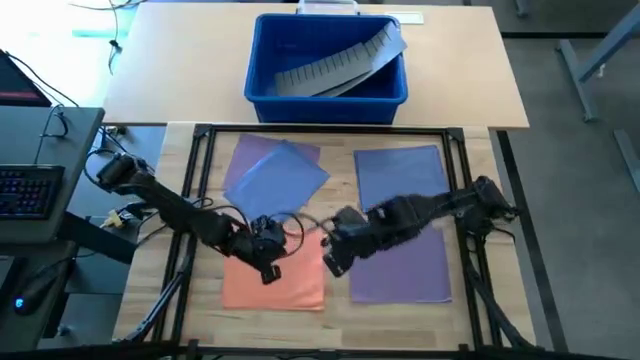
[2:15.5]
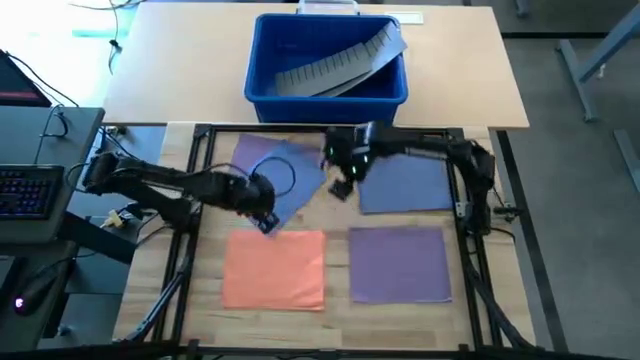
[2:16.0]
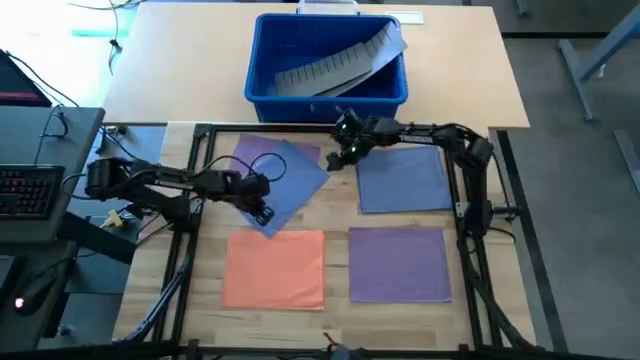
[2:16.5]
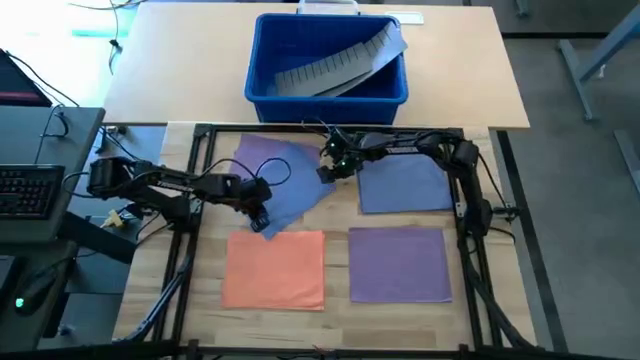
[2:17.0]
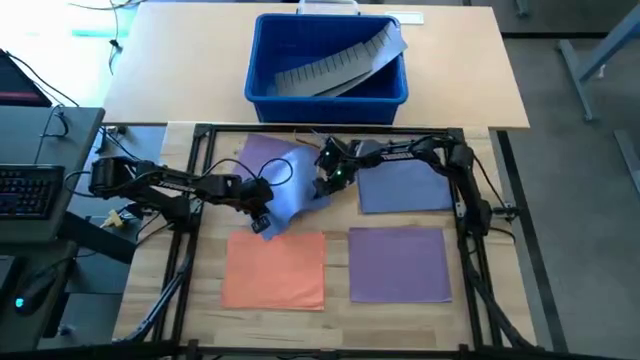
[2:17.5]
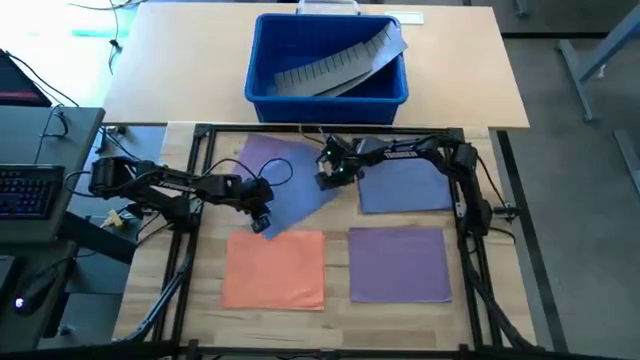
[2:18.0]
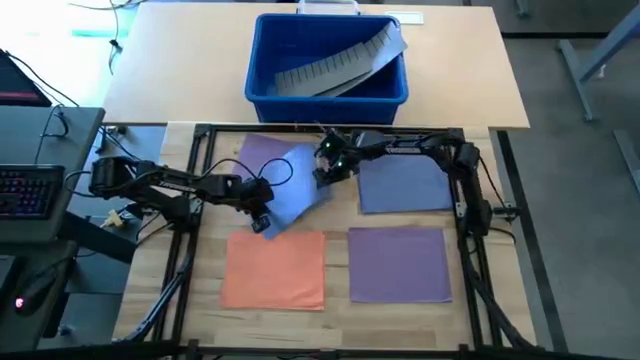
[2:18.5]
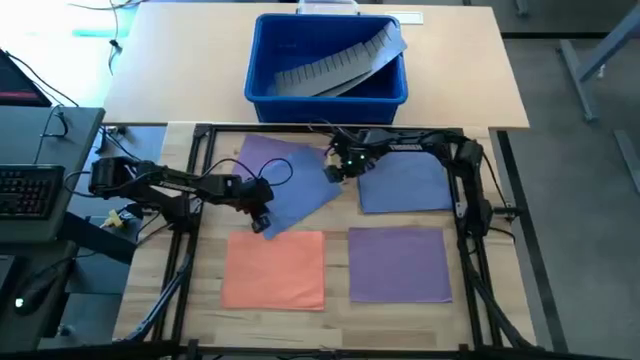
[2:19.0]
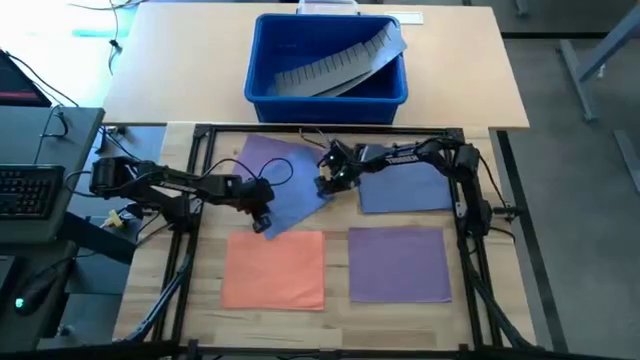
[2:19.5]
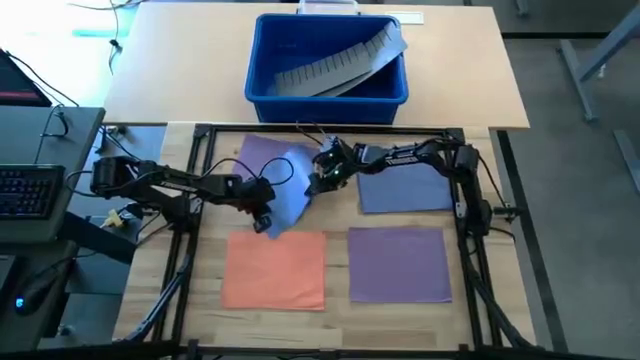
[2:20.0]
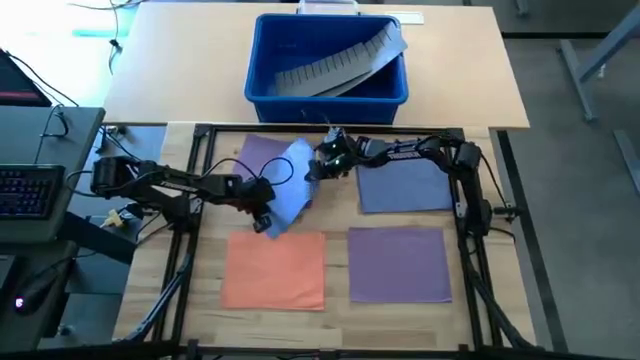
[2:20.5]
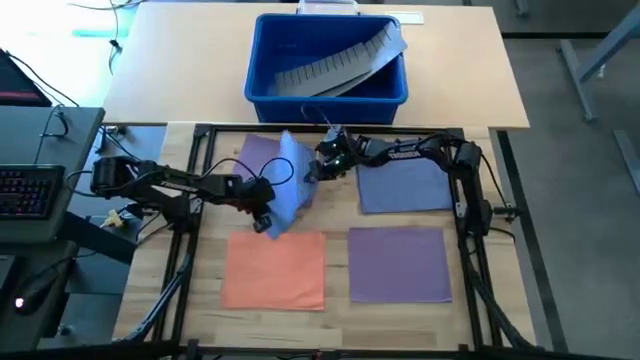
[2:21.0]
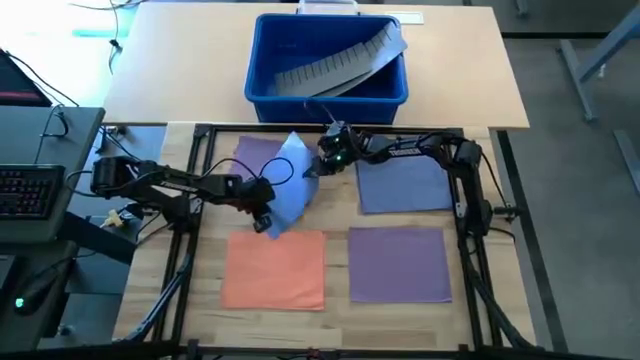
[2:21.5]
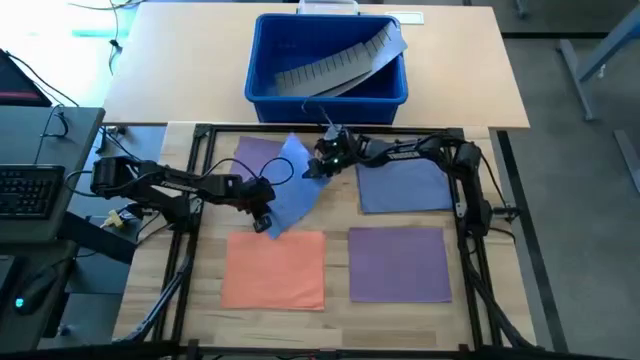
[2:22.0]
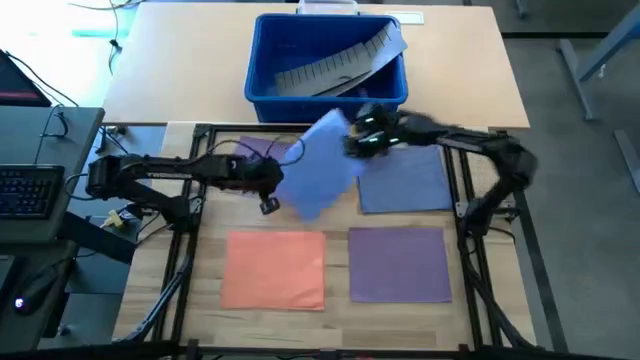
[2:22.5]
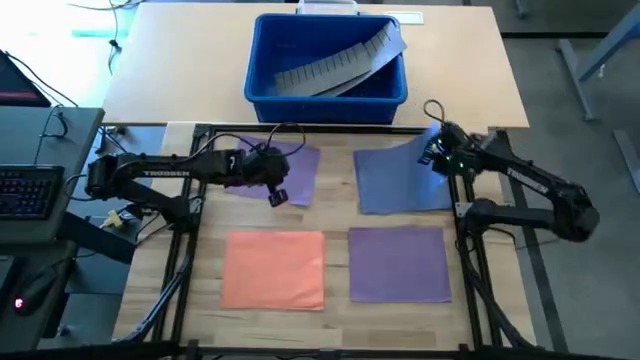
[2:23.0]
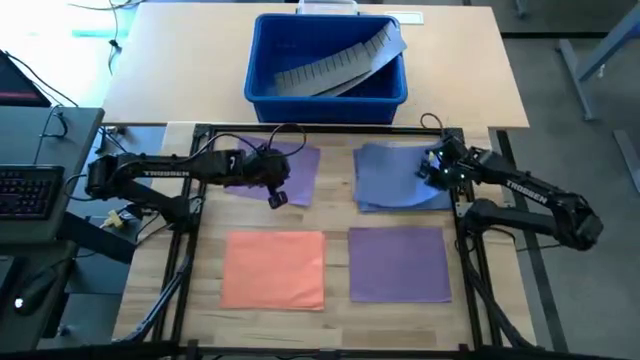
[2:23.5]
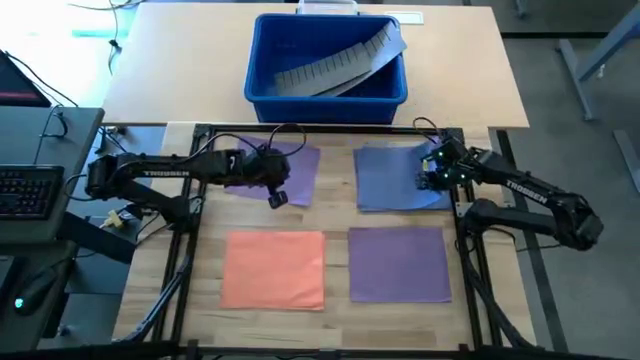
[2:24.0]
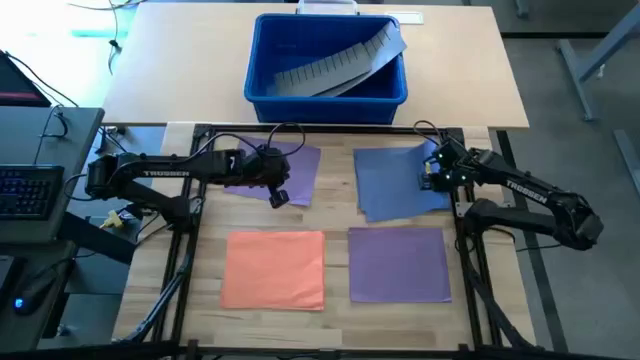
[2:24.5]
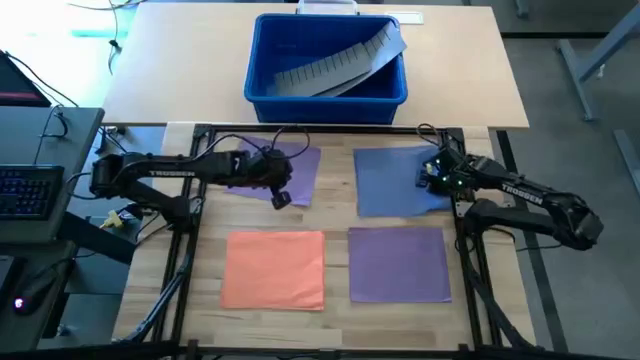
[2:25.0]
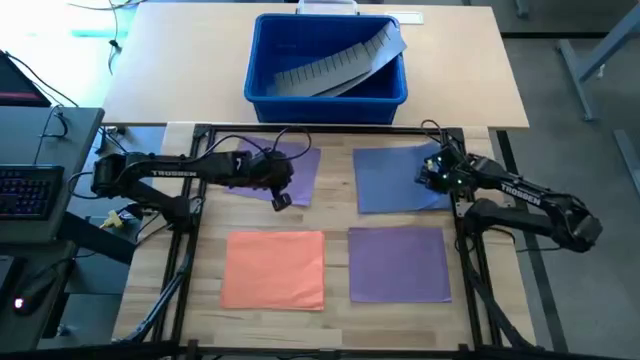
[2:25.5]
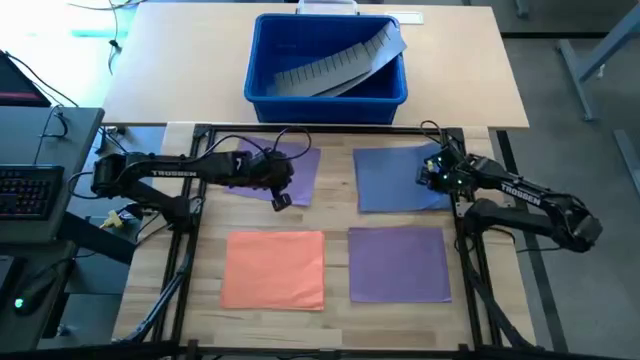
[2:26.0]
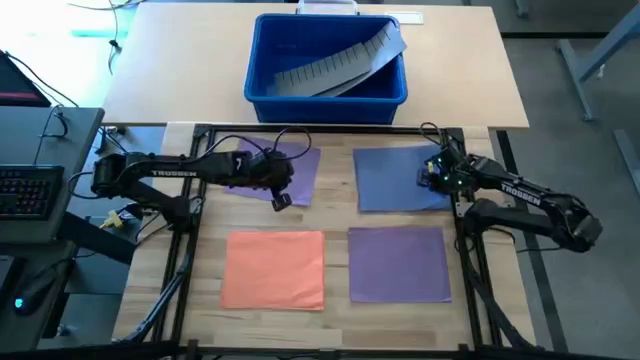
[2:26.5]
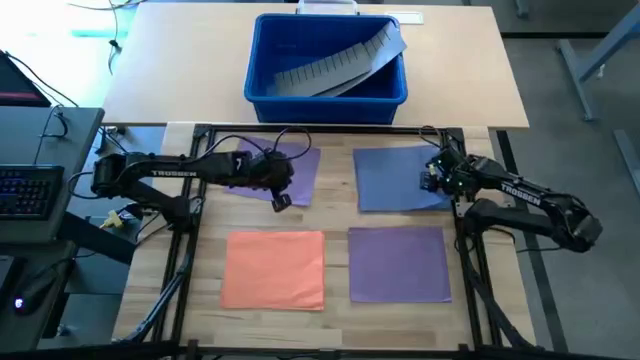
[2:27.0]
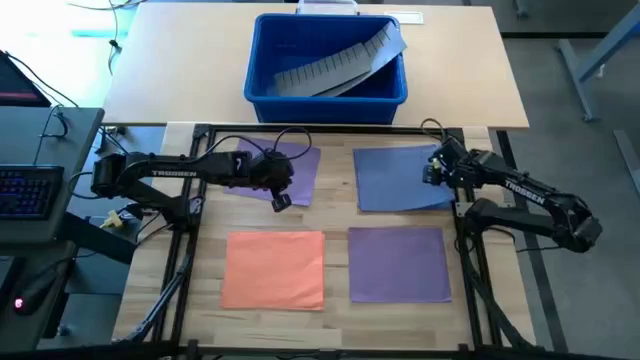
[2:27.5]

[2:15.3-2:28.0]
Task: Organize paper
Stack the blue paper on top of the blue paper

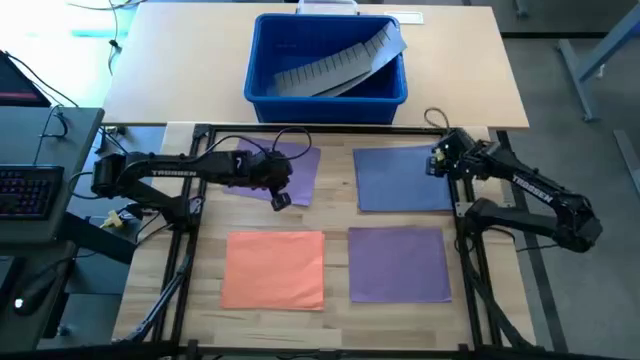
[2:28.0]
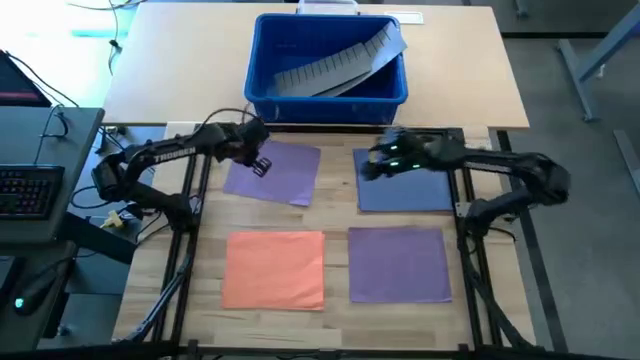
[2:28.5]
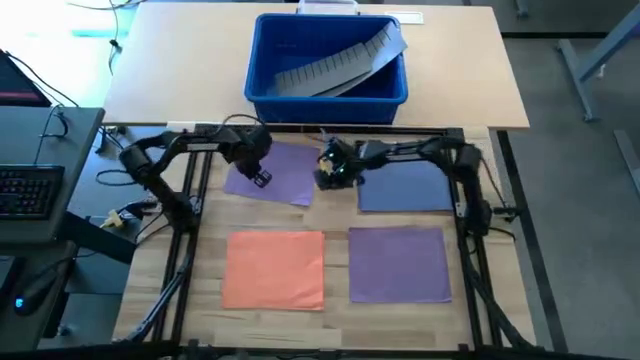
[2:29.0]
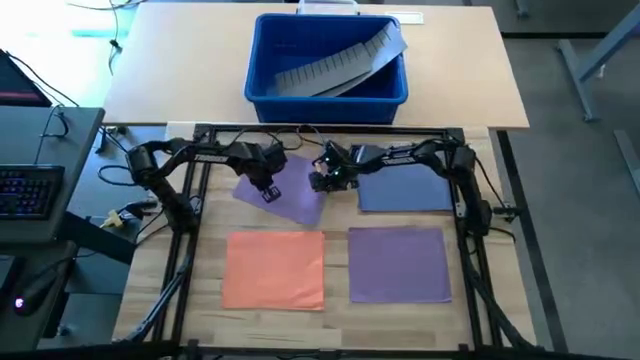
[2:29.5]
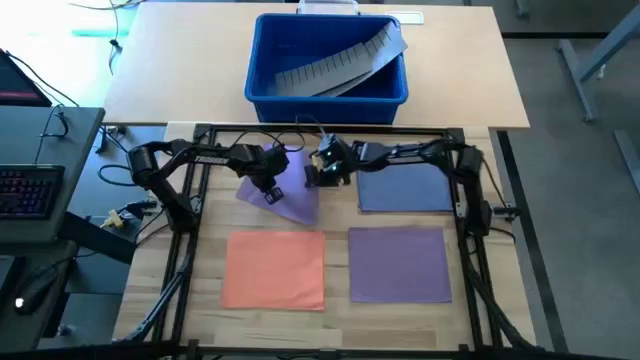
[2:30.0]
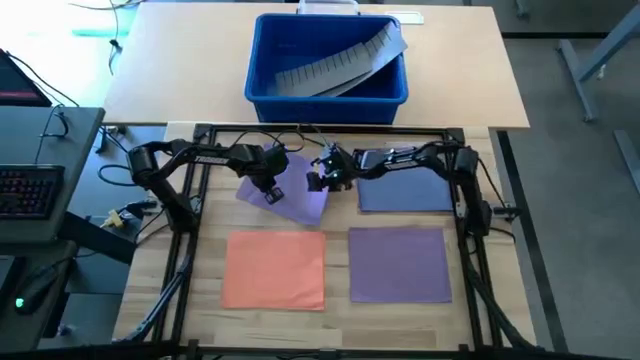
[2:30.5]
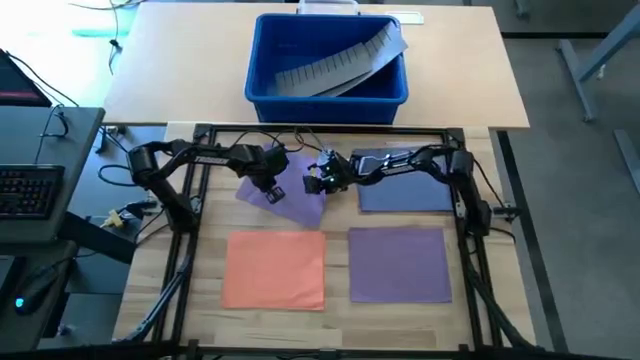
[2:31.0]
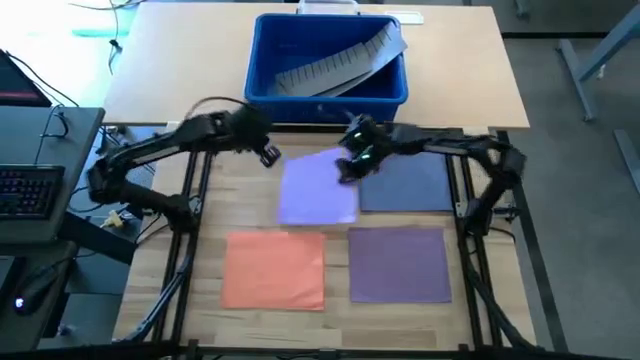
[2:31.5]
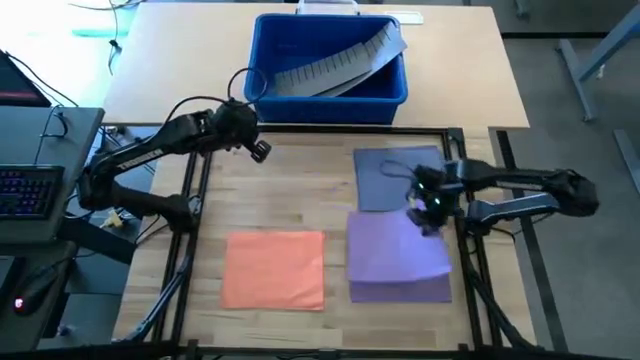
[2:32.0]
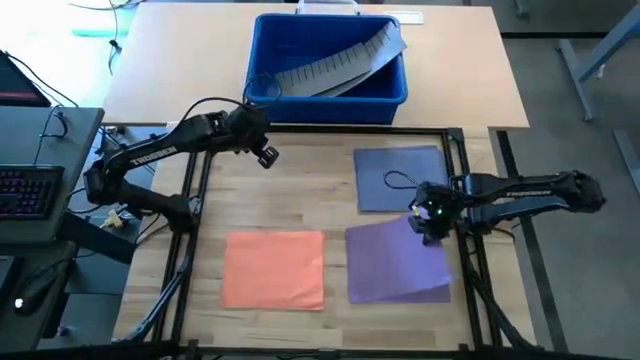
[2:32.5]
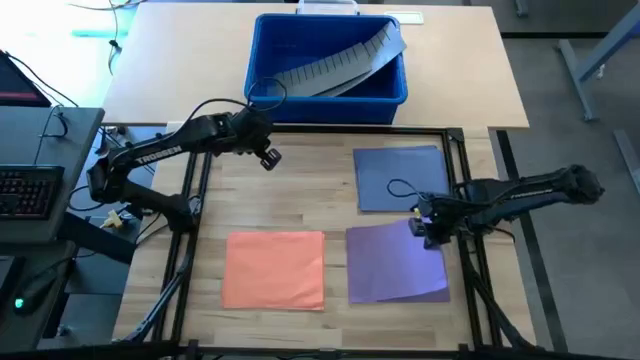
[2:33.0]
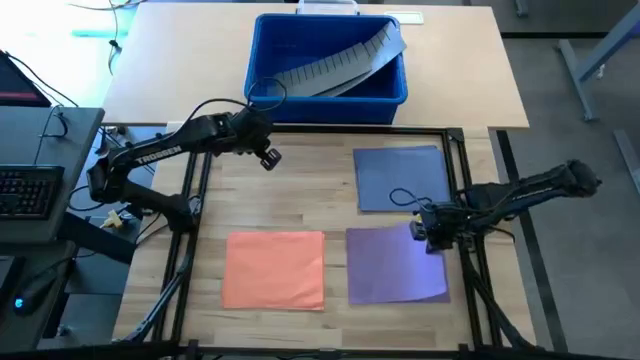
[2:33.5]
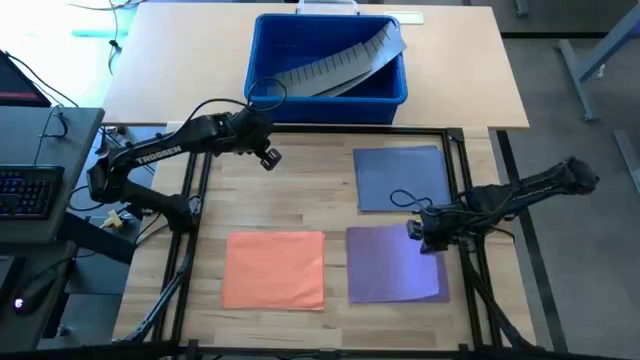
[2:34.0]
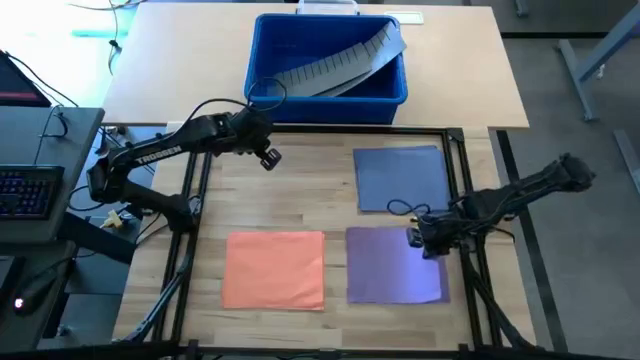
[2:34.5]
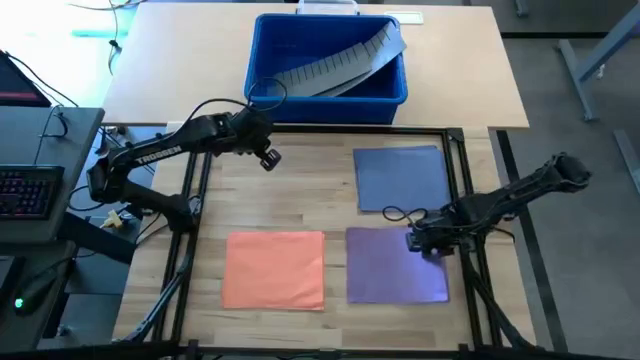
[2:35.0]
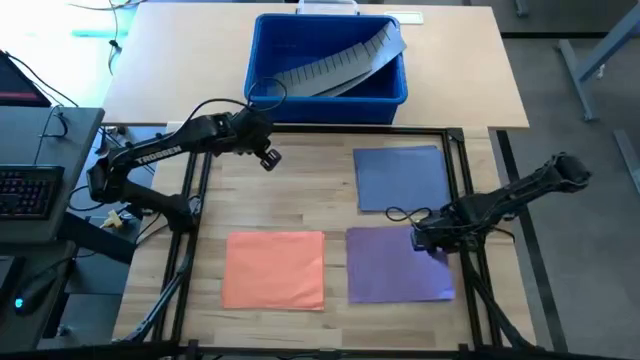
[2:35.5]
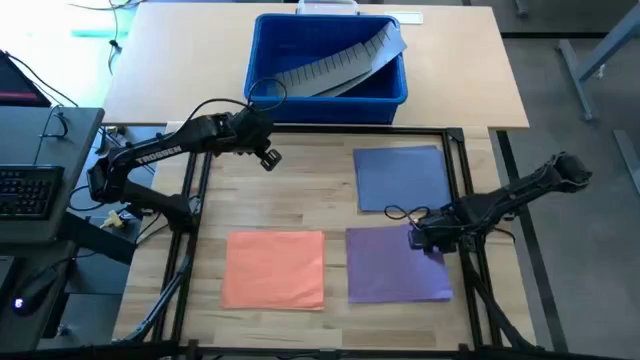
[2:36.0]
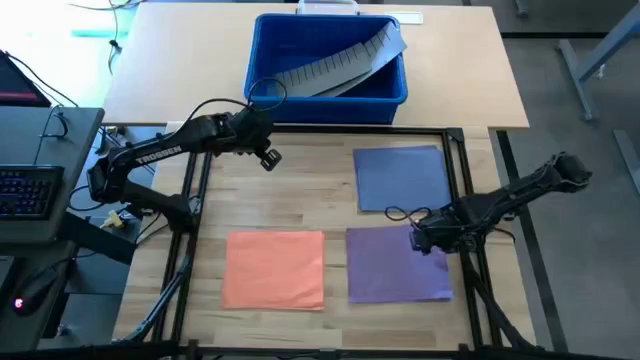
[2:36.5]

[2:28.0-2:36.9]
Stack the purple paper on top of the purple paper
